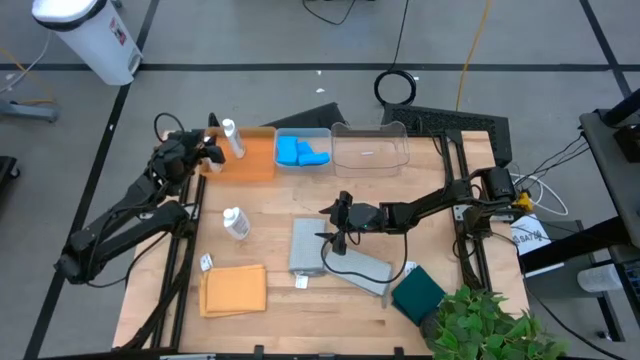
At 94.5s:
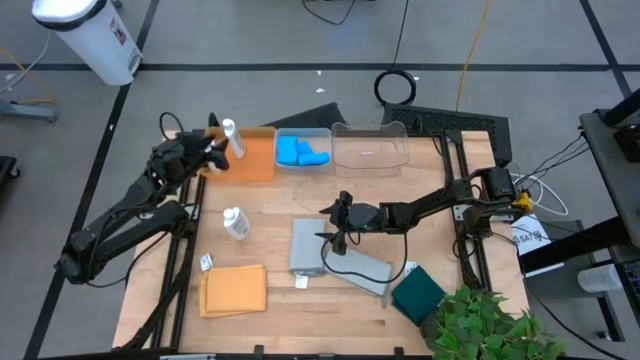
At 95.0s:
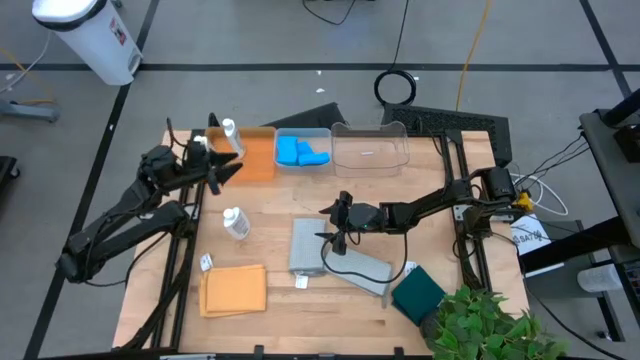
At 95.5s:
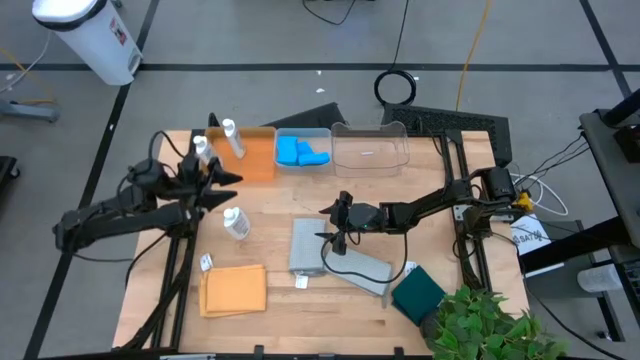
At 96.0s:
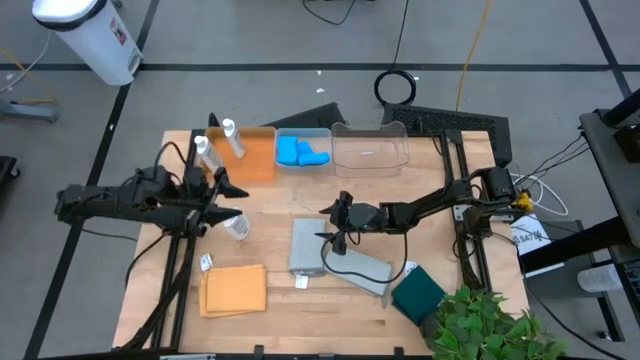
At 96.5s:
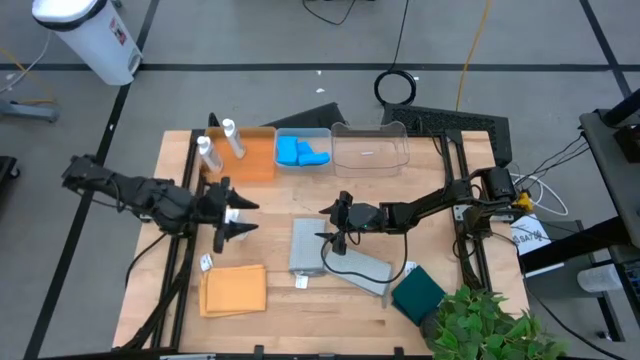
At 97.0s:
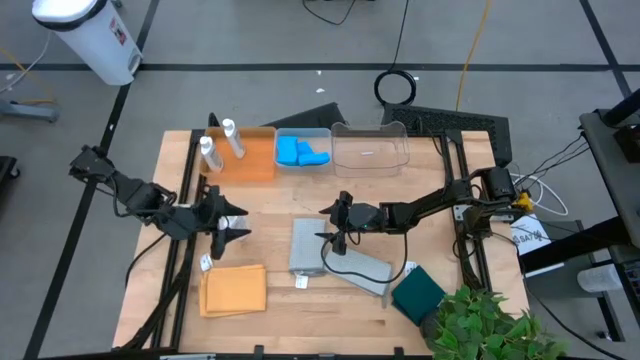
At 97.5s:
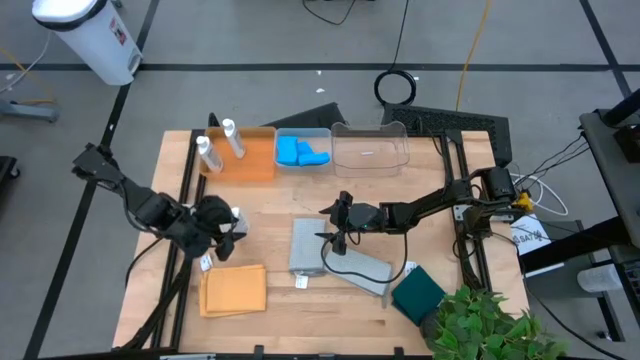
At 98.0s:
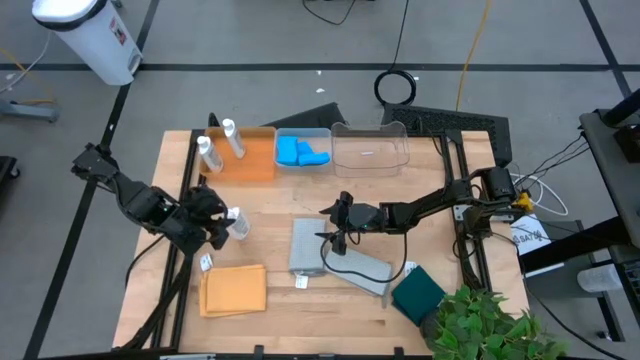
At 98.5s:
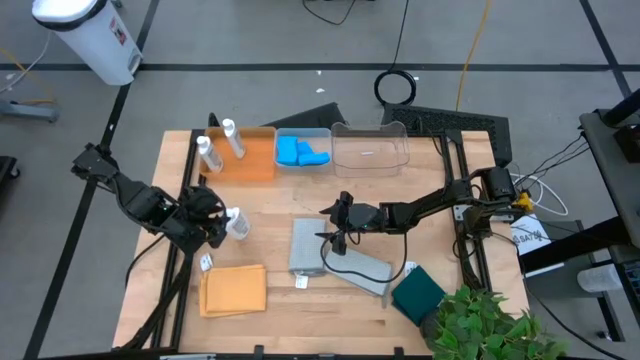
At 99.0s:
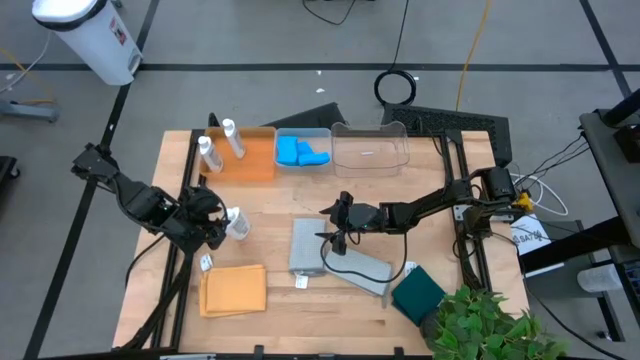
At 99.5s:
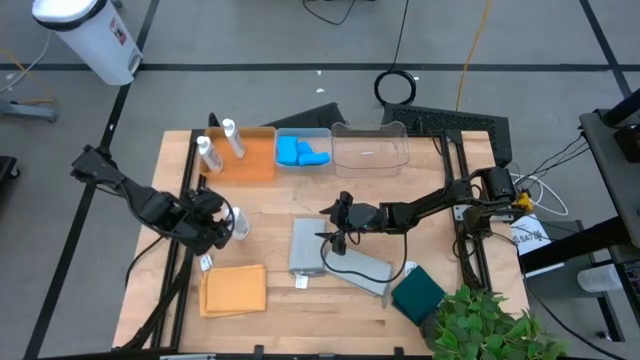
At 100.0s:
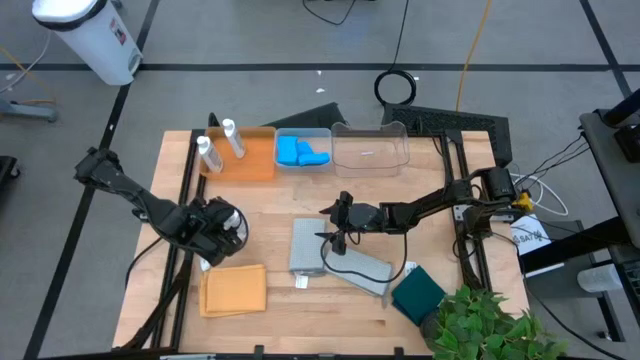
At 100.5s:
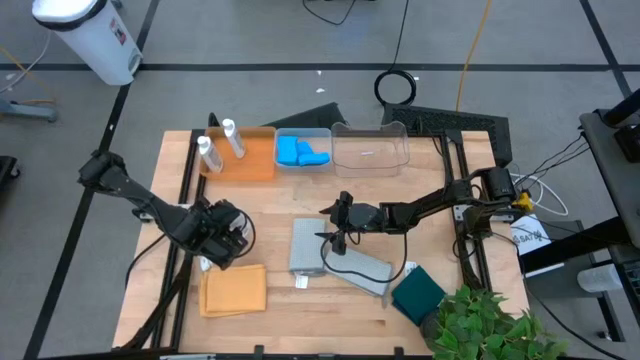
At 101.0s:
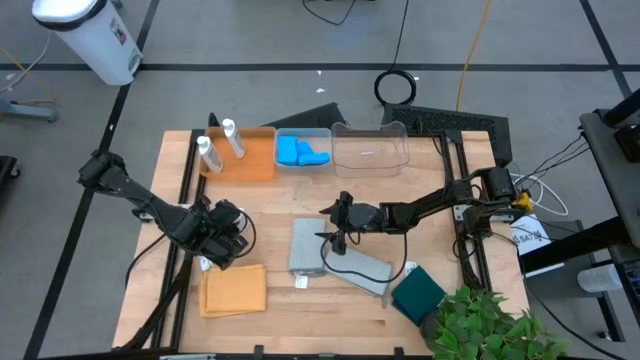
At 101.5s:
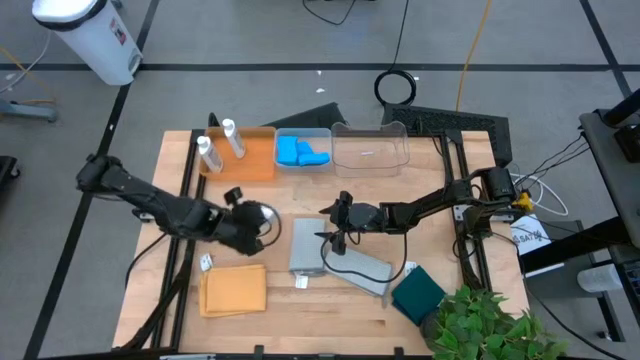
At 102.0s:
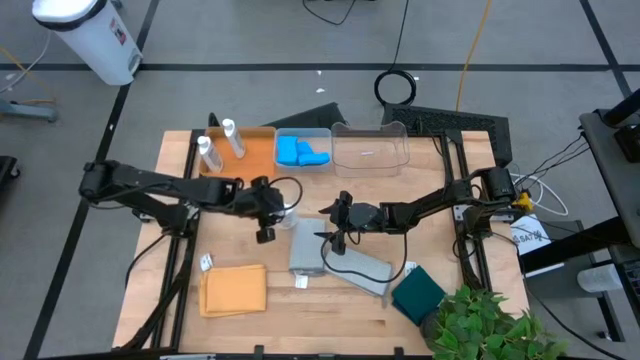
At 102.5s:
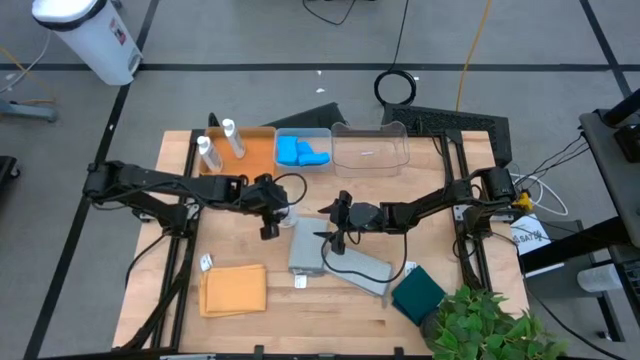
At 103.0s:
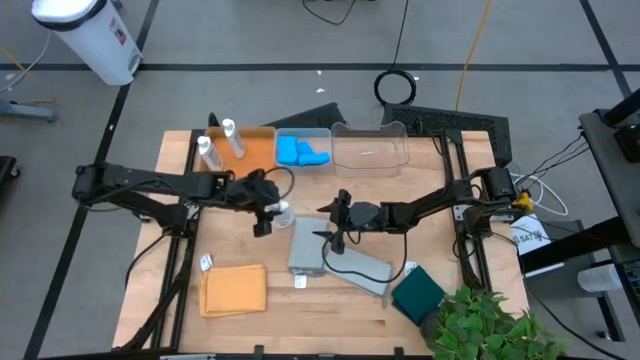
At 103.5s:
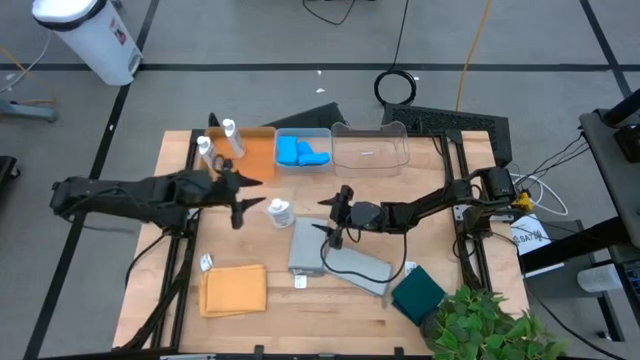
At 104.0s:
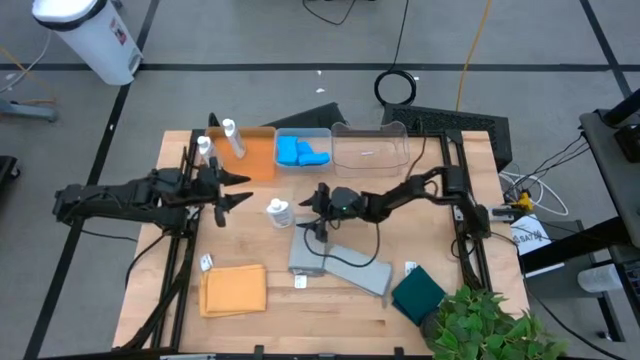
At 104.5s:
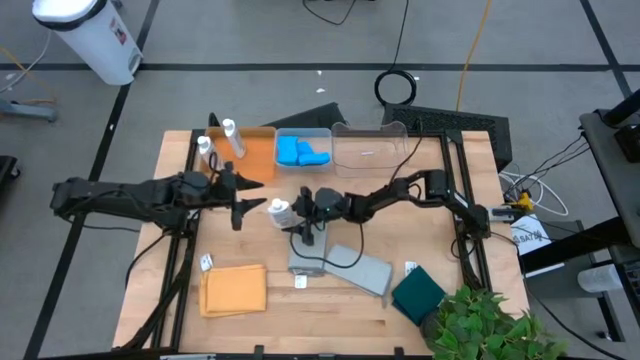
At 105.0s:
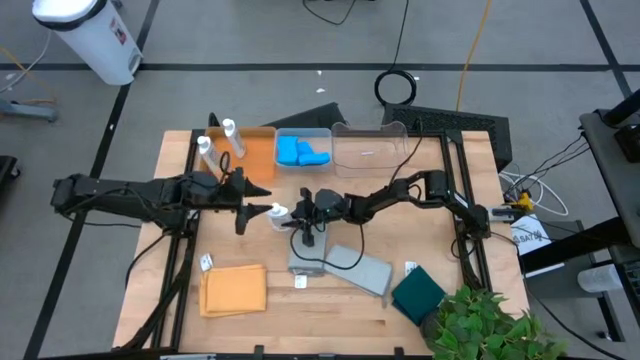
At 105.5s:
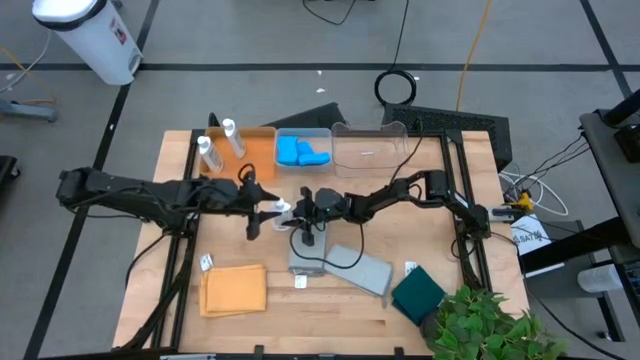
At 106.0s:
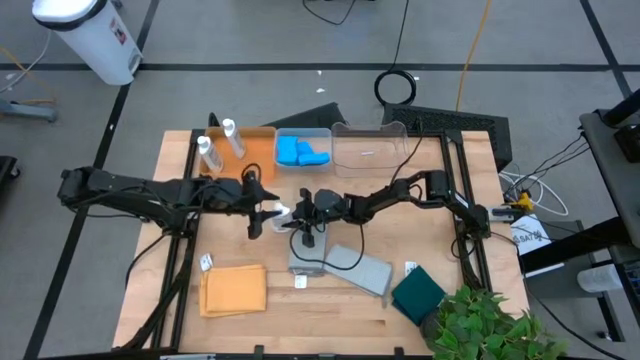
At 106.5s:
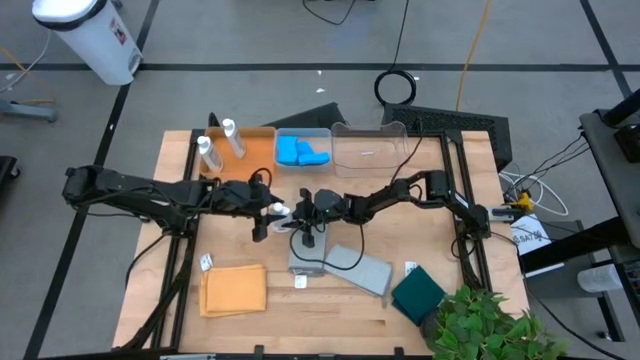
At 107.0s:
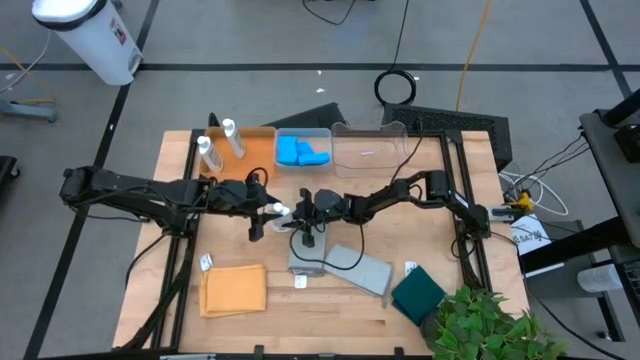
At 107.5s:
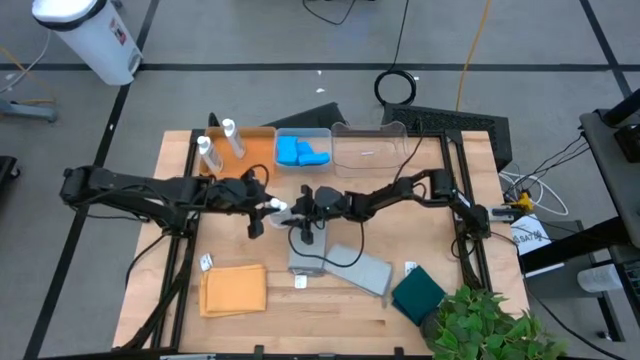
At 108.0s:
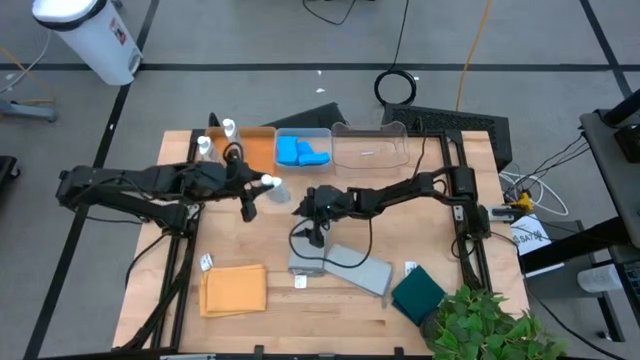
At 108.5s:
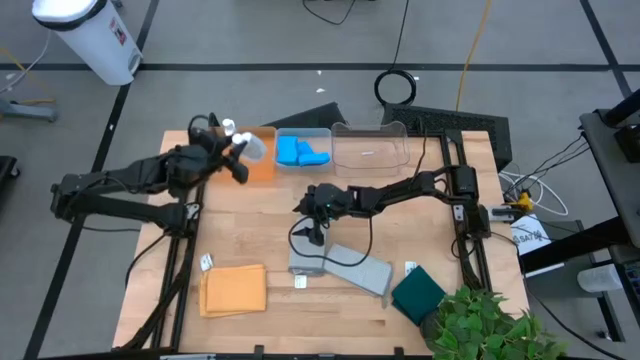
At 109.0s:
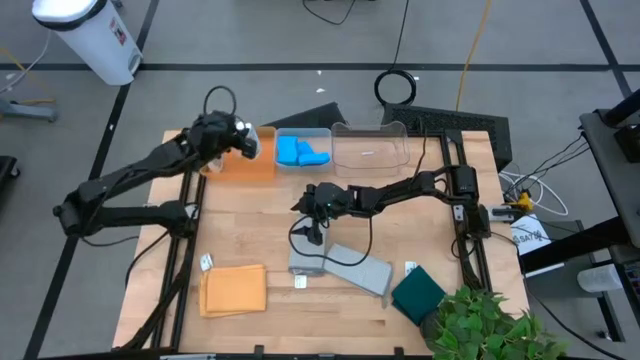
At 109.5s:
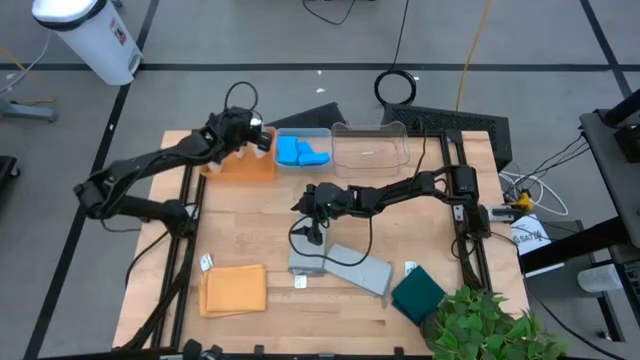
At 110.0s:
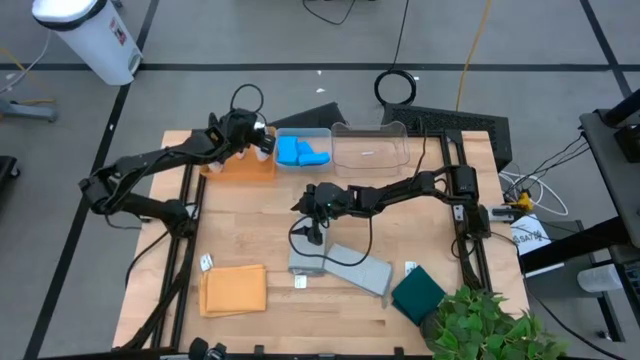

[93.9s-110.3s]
Task: Pick & Place Kitchen Items
Put the white plastic restorer bottle into the orange bin

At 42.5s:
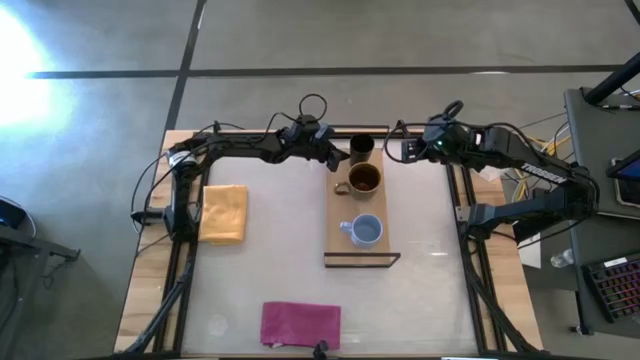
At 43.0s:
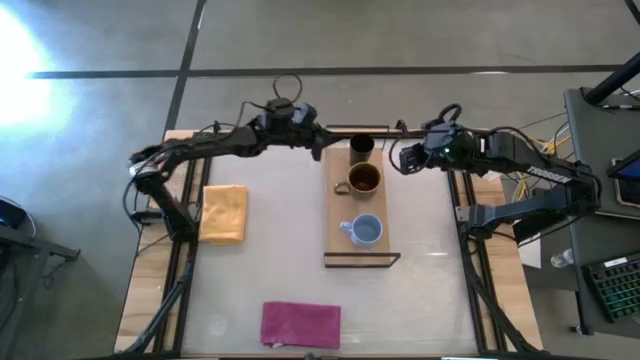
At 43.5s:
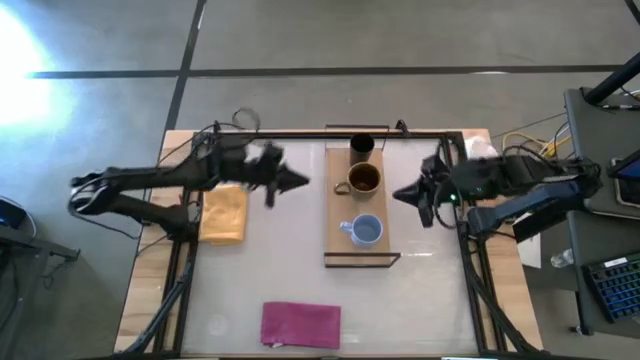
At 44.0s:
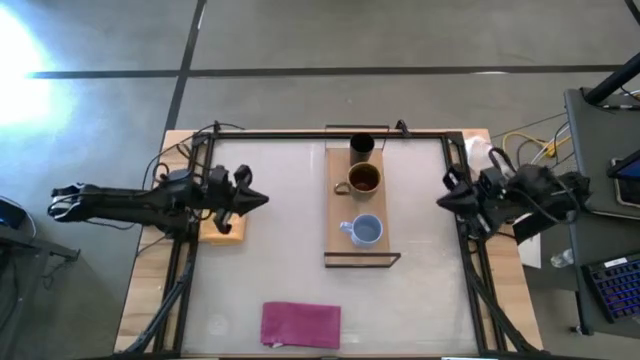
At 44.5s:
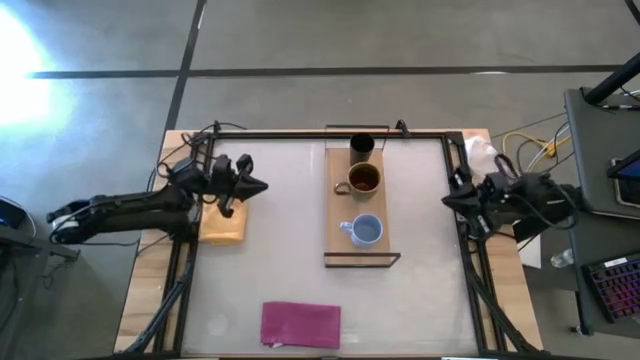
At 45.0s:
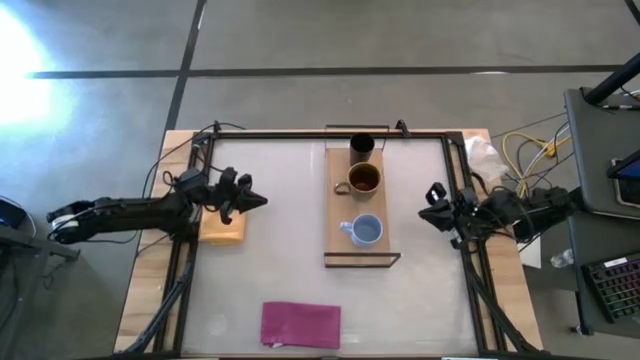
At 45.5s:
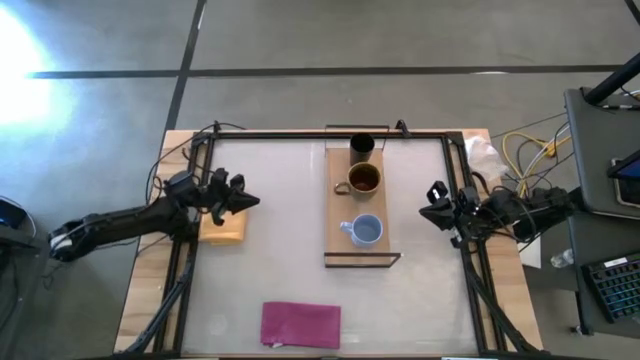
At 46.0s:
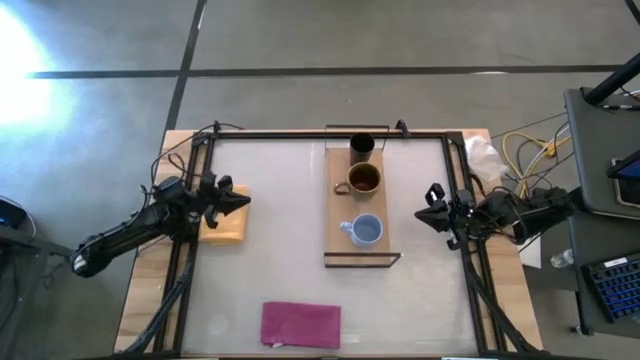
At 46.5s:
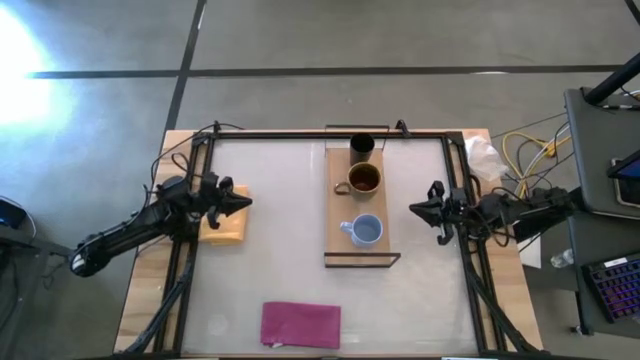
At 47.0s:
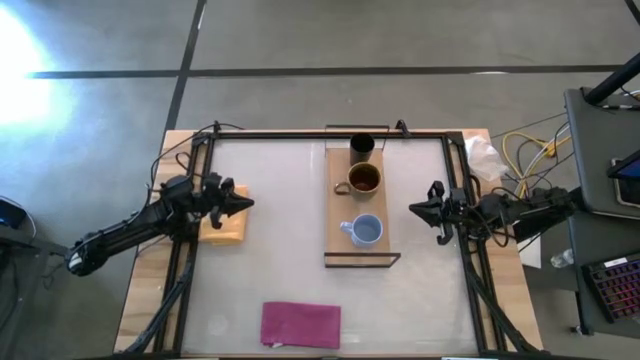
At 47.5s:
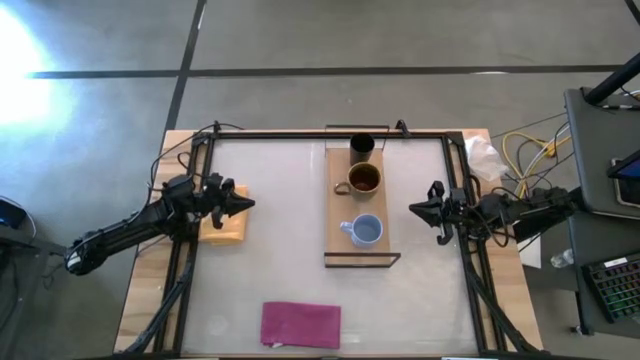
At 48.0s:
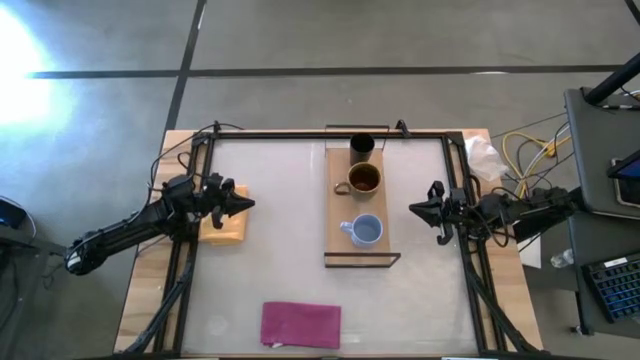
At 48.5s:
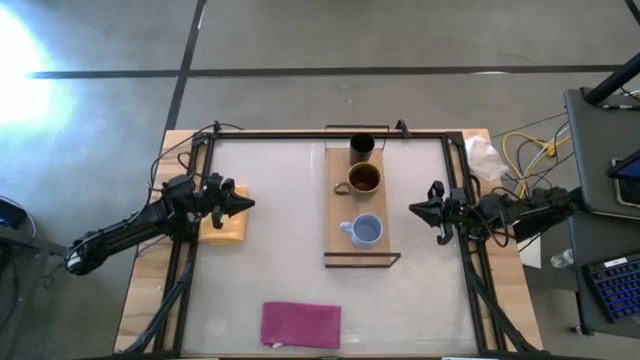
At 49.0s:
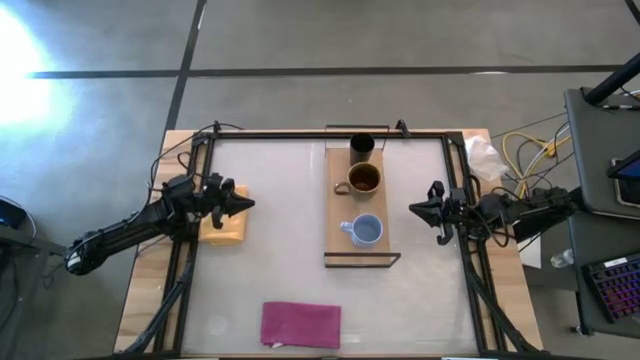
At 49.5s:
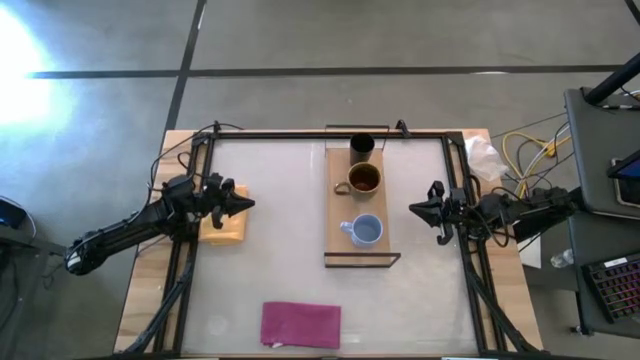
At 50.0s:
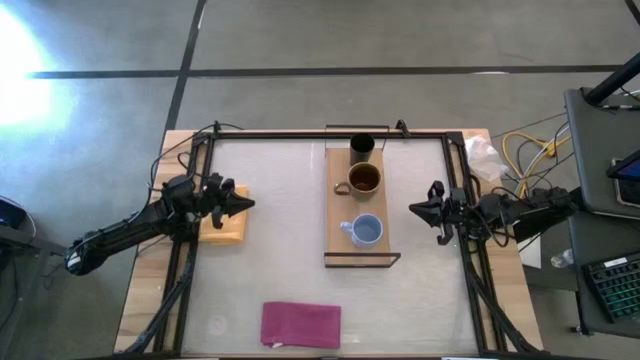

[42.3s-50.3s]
Task: Stack small to large cups/mugs on shelf
Return to Home Position
